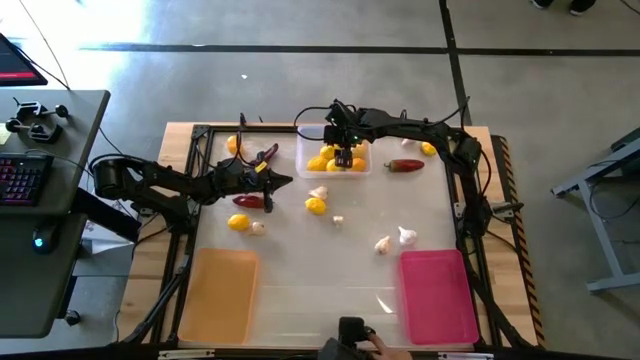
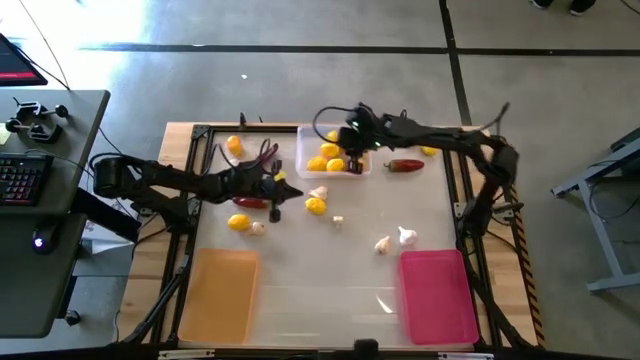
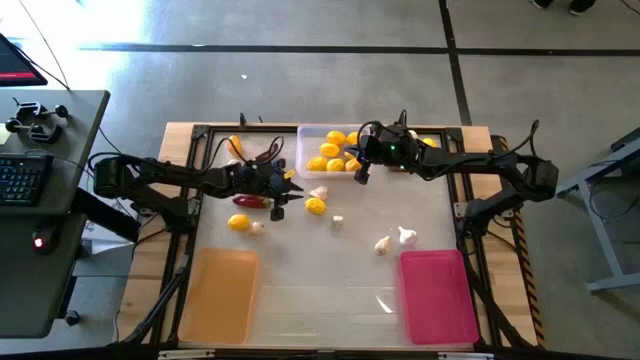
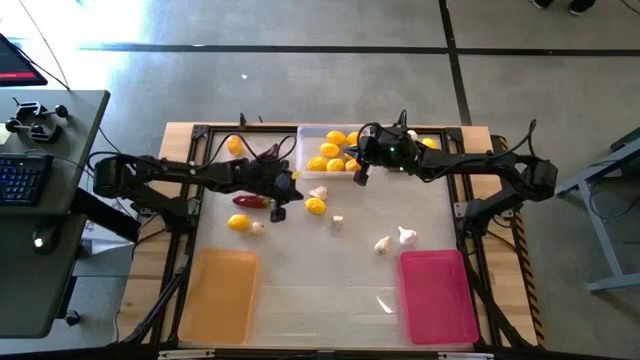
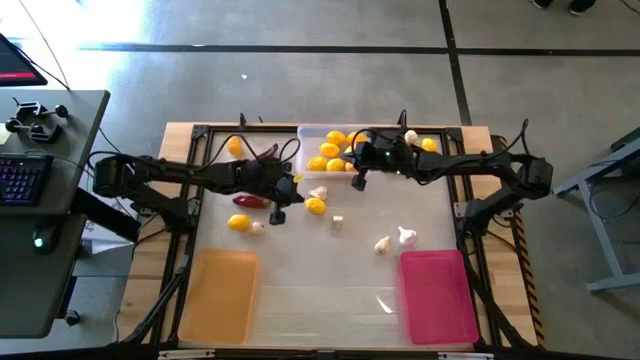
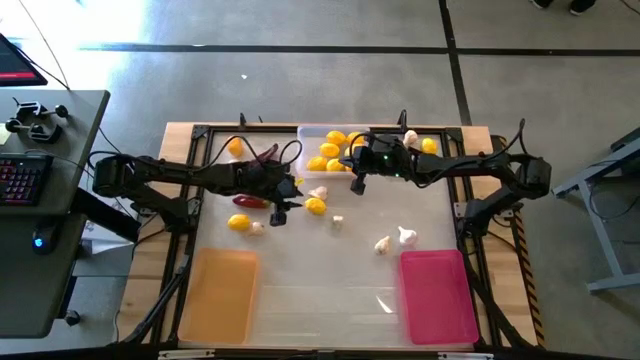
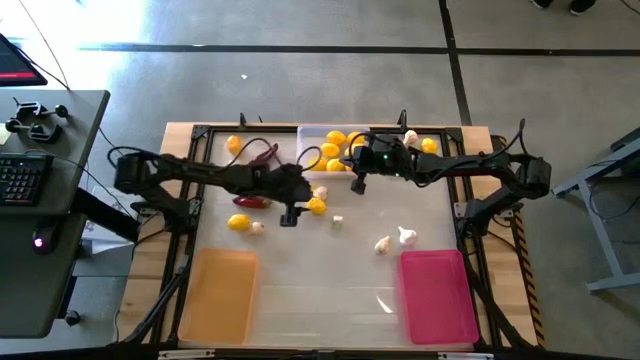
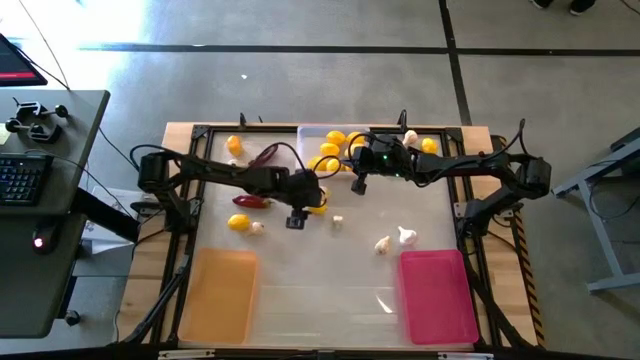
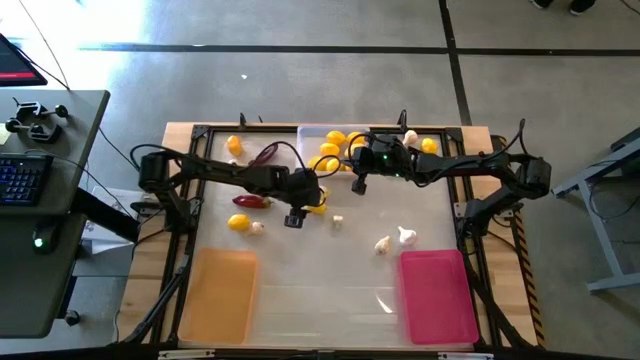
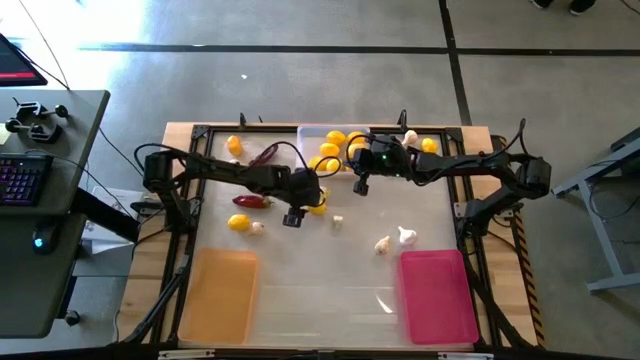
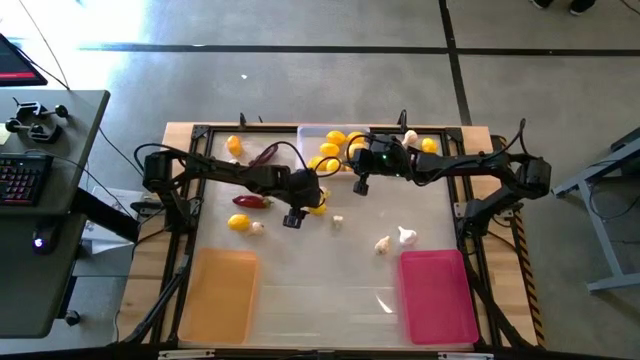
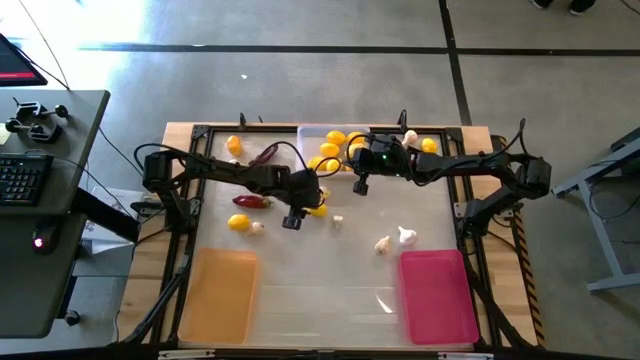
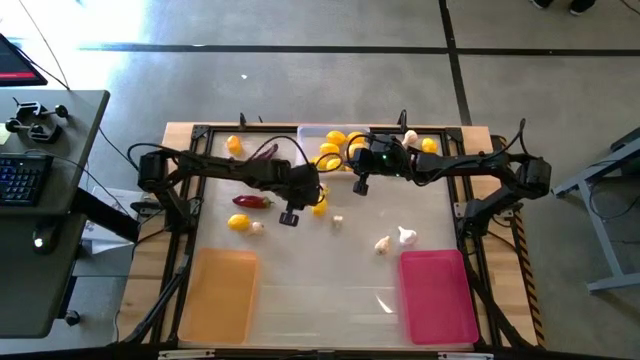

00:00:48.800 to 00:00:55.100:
Task: Sort produce into baskets
Put the center lemon into the transparent bin

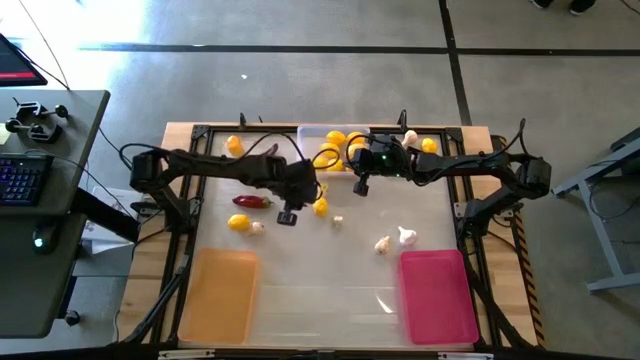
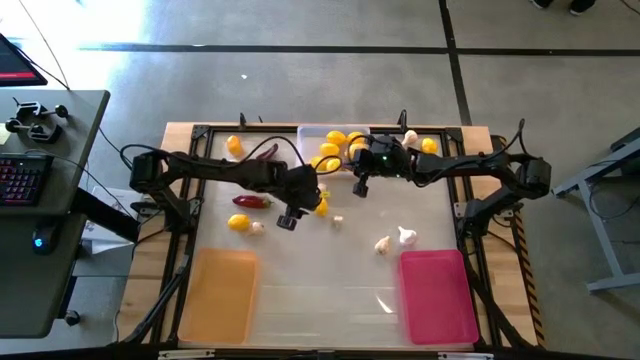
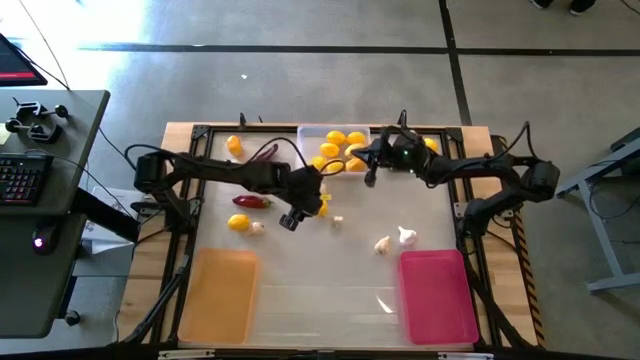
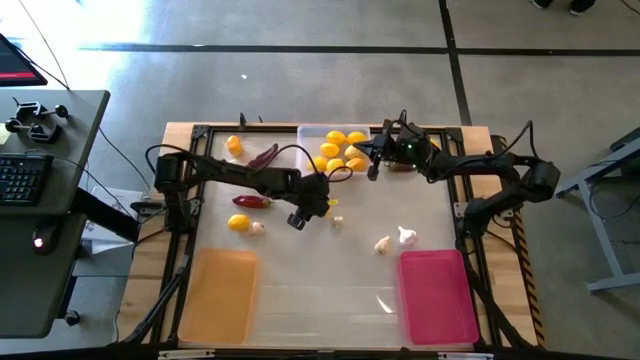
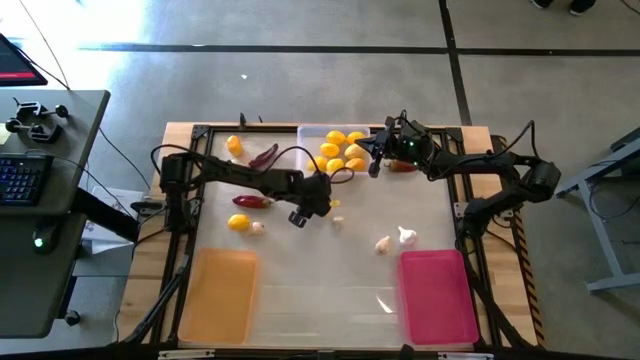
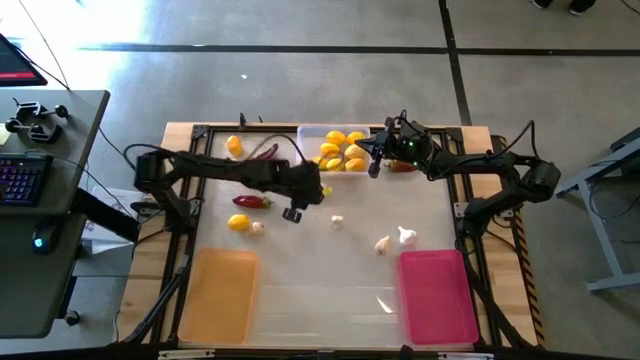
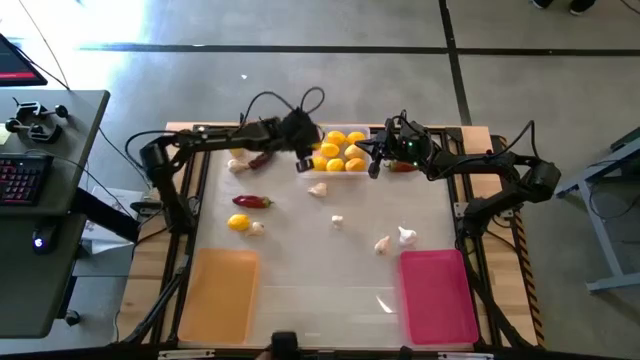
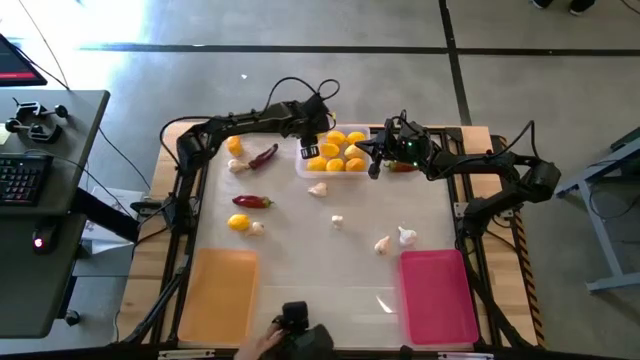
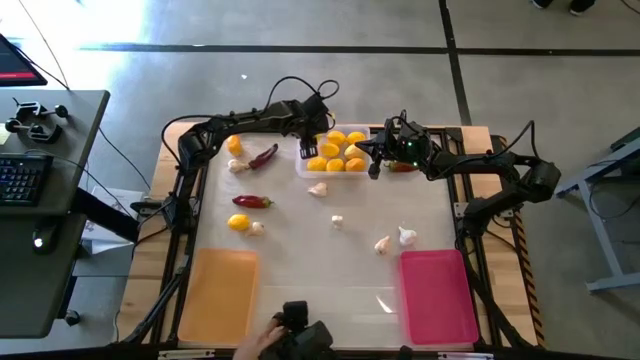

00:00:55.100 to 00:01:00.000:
Put the center lemon into the transparent bin

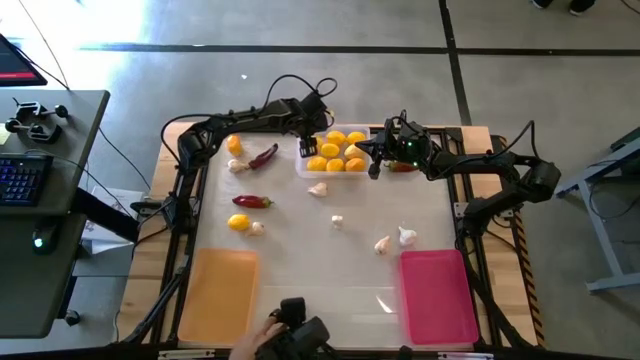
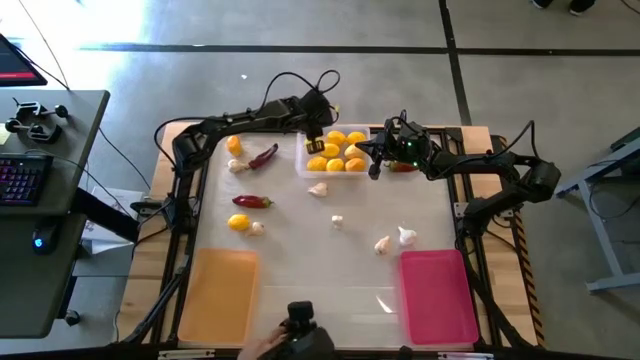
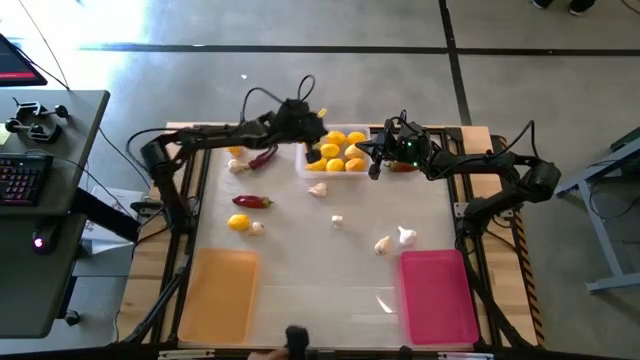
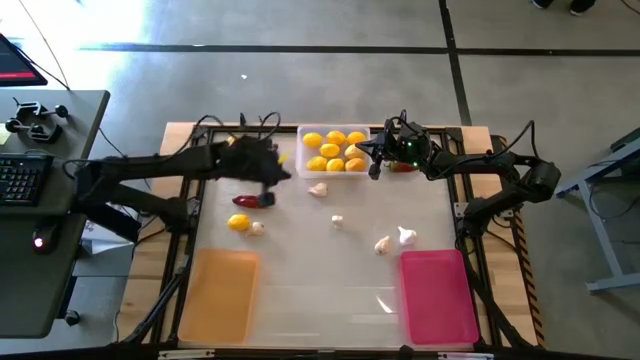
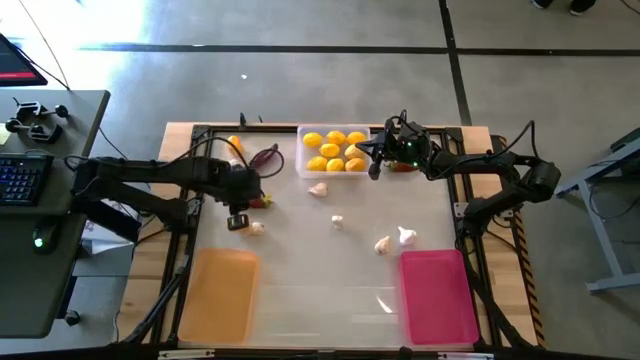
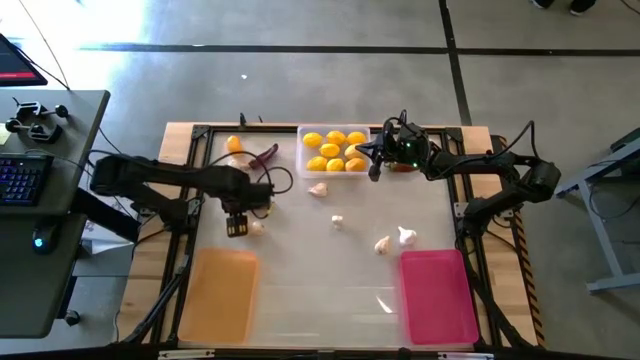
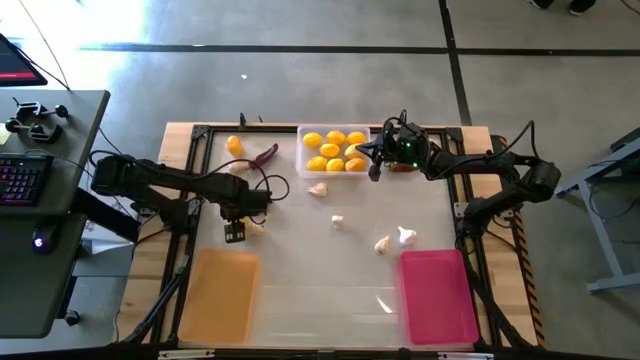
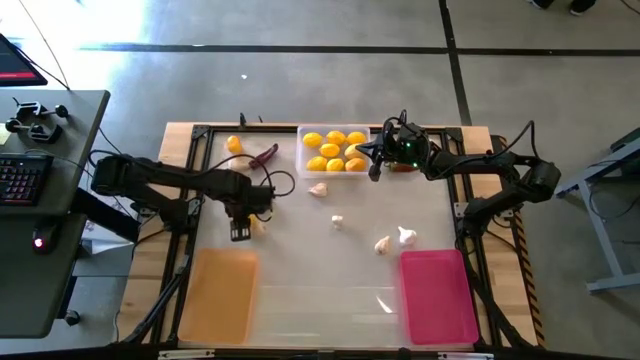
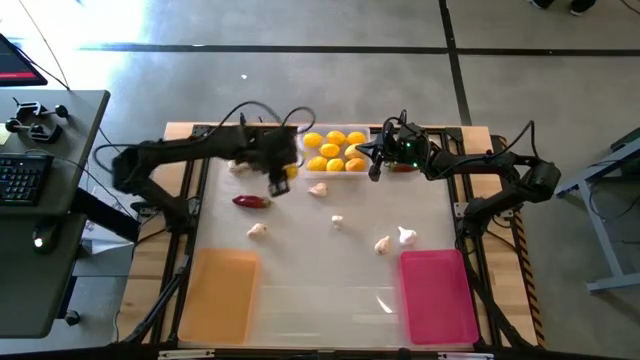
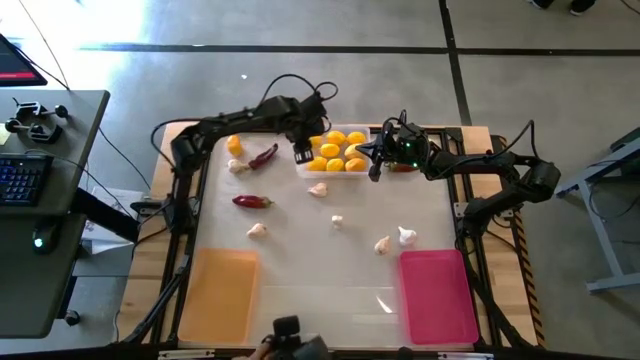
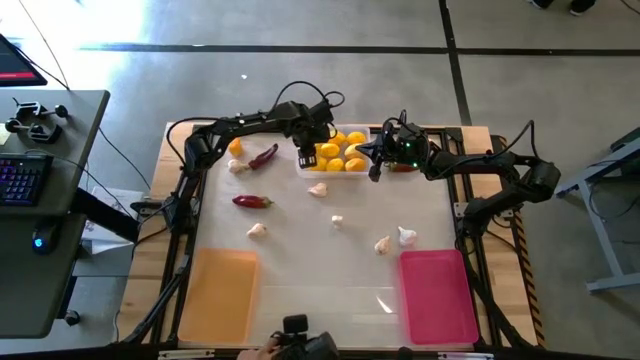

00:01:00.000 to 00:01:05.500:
Put the bottom left lemon into the transparent bin

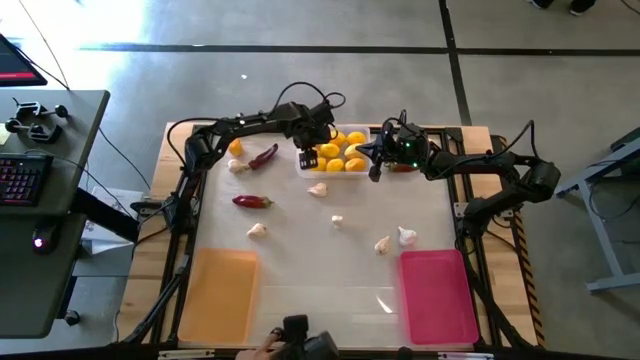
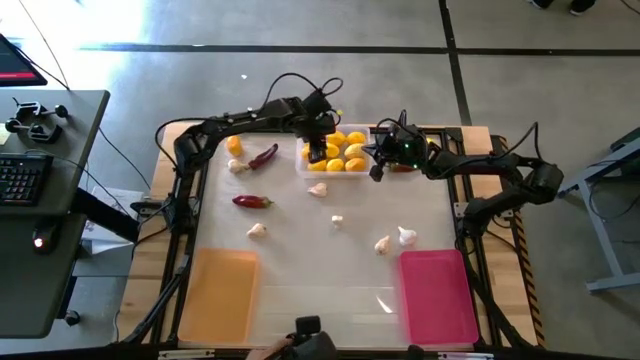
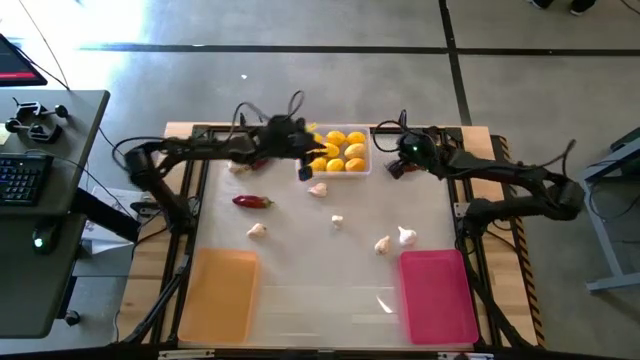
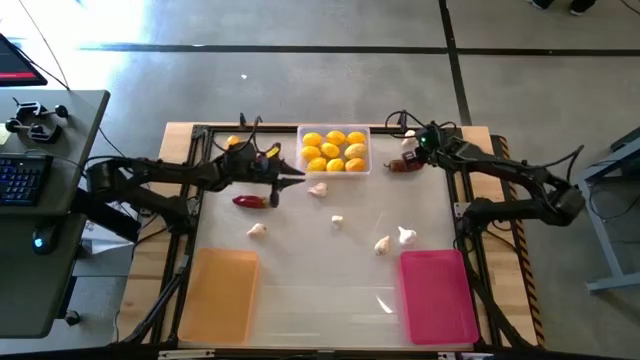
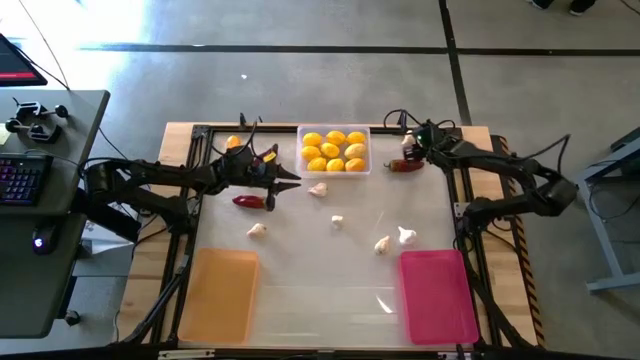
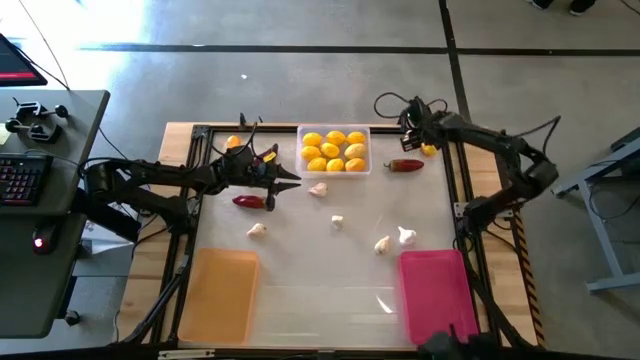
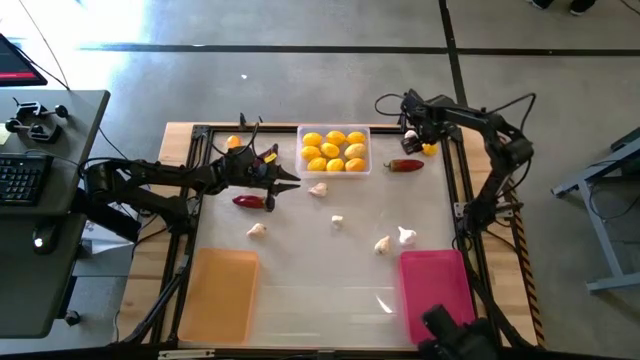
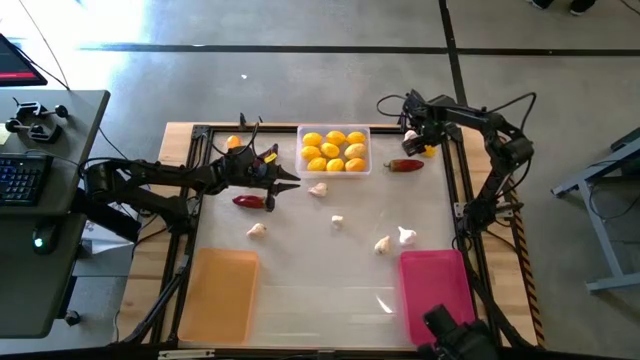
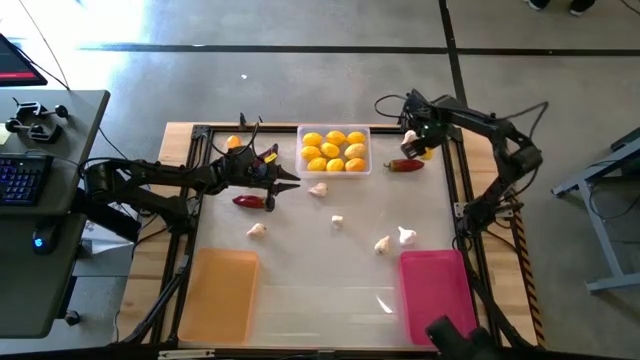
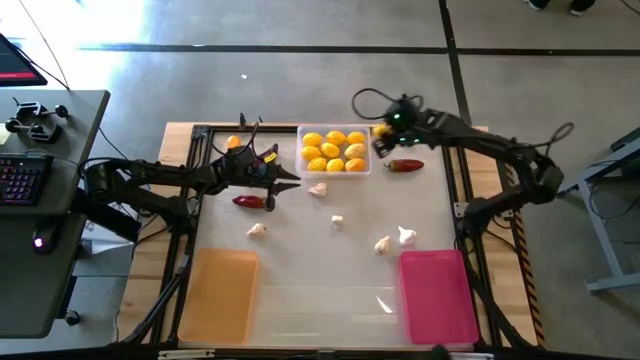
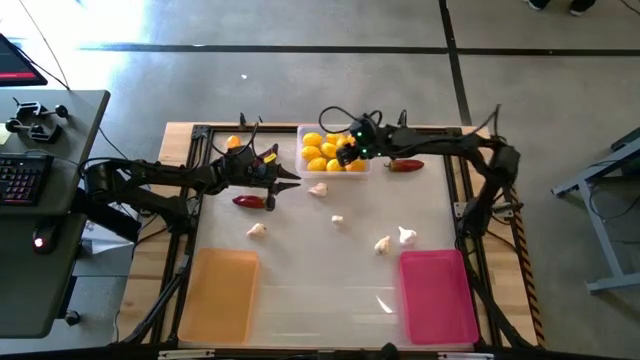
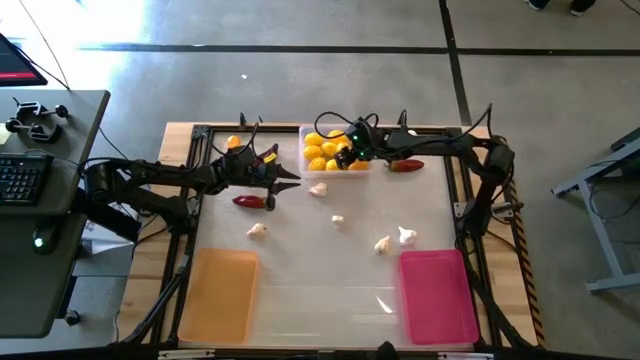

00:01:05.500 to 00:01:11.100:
Put the right lemon into the transparent bin
